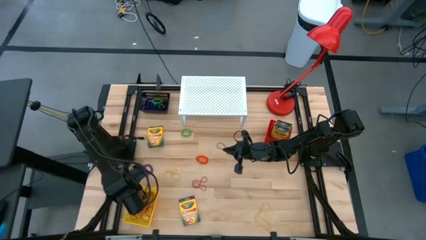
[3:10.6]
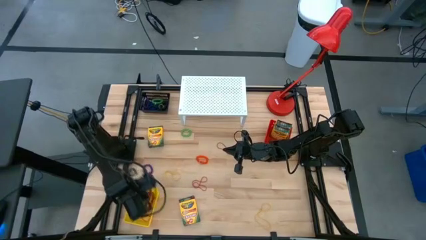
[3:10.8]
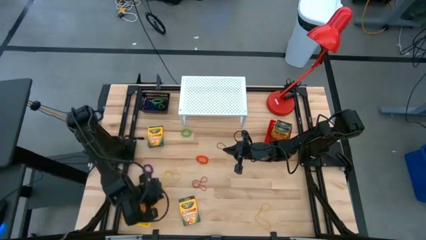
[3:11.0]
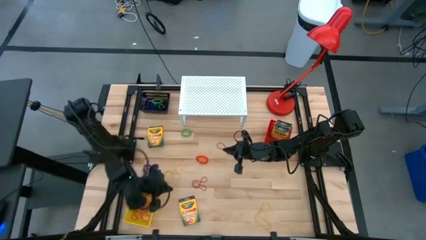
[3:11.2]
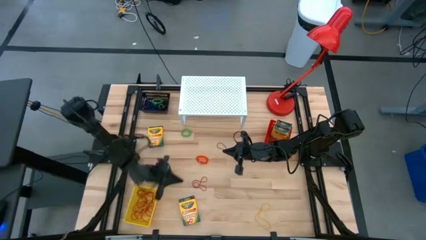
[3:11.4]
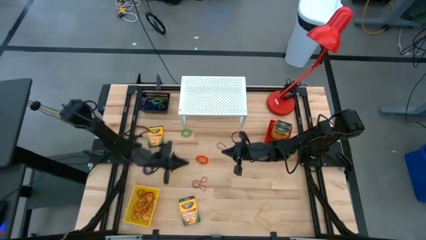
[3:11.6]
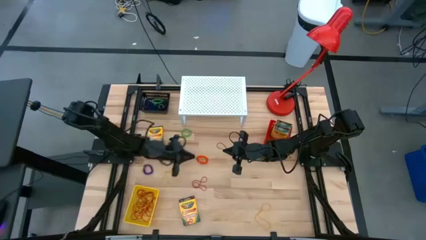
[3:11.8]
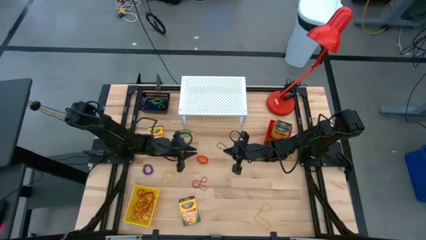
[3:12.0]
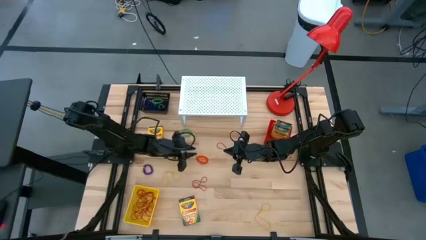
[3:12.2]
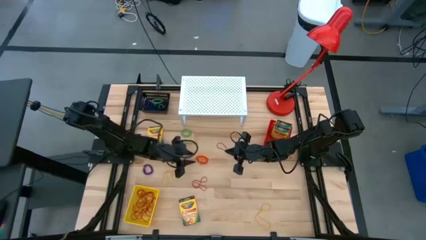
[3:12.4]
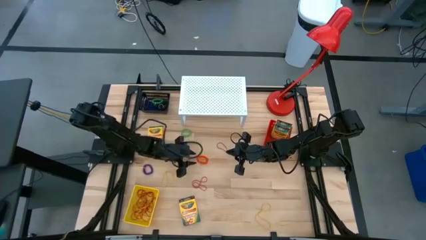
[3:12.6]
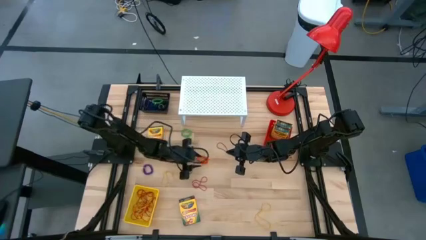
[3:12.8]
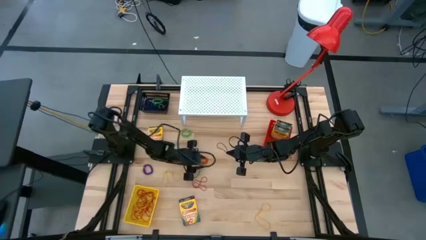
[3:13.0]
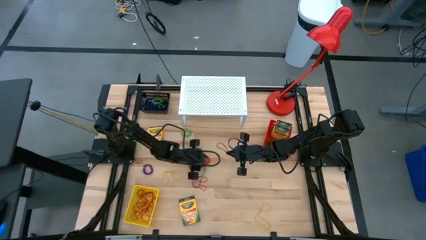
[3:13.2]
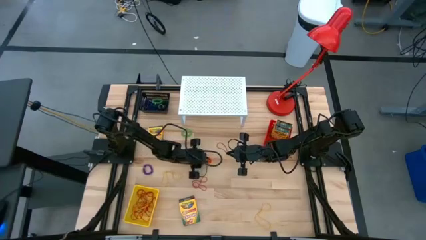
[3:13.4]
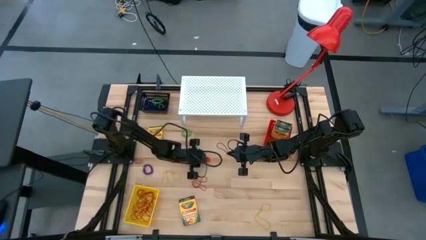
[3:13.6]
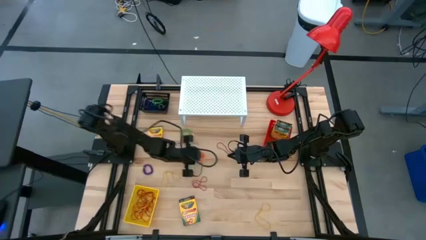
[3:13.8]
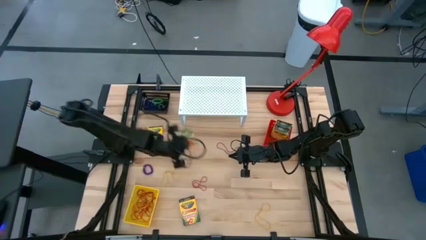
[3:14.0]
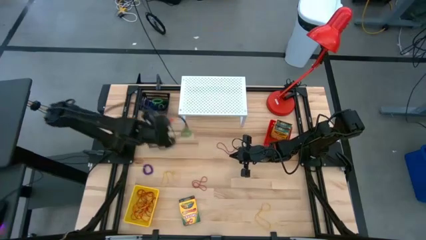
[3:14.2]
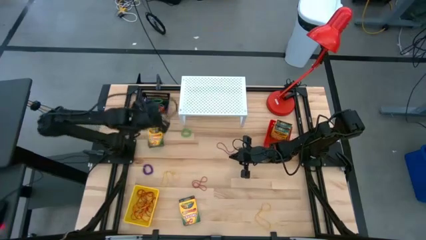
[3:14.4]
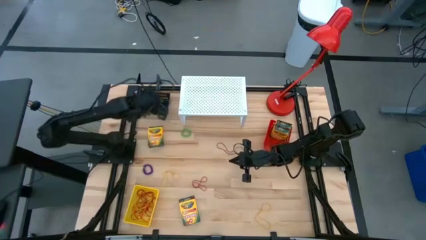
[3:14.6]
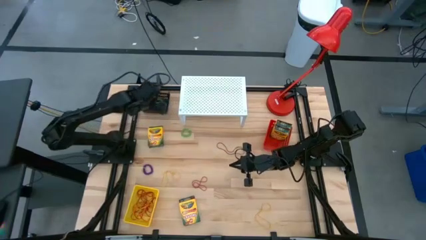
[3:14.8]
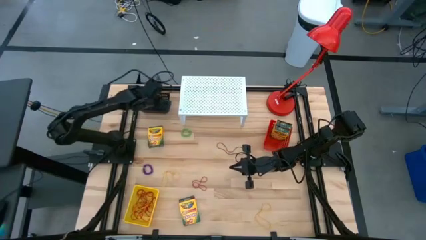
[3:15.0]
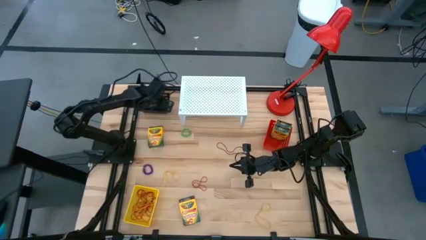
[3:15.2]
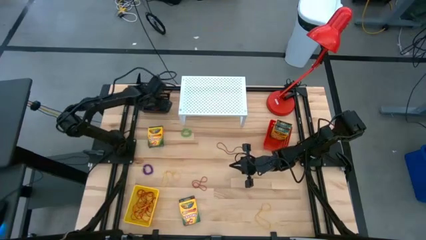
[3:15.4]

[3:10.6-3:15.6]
Task: Pick & Place Office Desk Supplies
Put the orange spring rubber band into the black bin

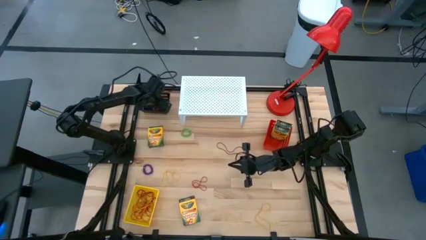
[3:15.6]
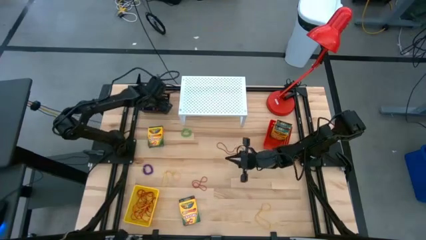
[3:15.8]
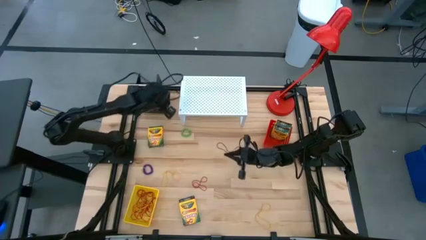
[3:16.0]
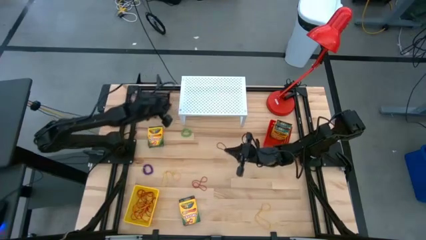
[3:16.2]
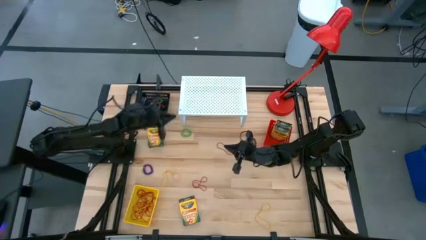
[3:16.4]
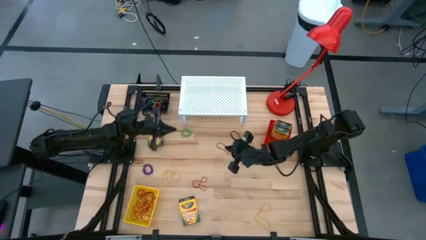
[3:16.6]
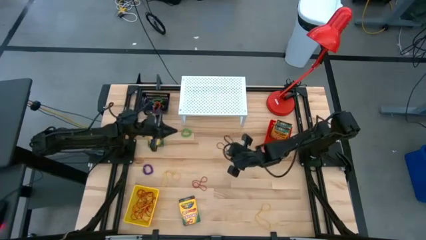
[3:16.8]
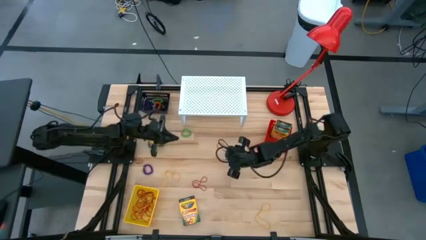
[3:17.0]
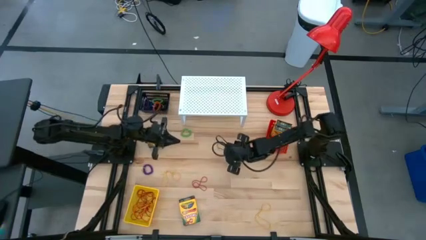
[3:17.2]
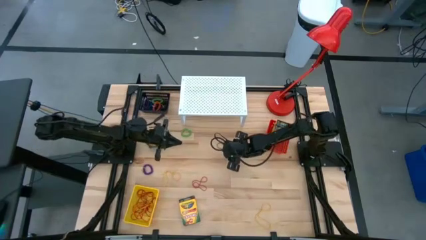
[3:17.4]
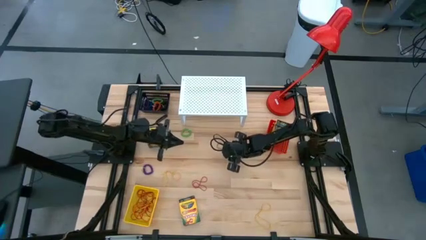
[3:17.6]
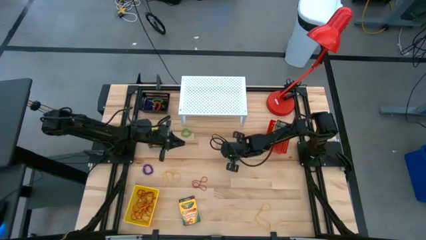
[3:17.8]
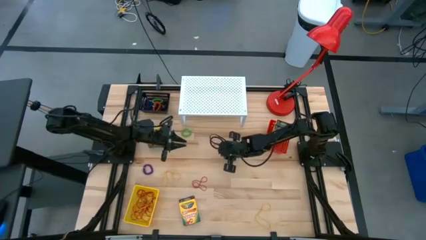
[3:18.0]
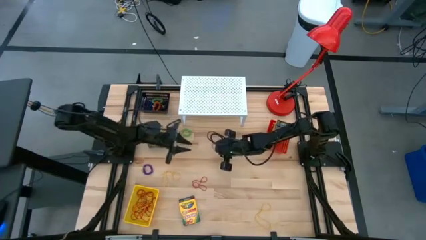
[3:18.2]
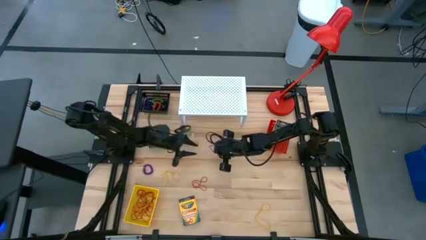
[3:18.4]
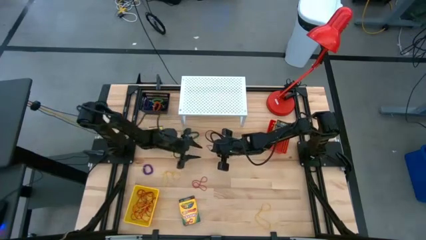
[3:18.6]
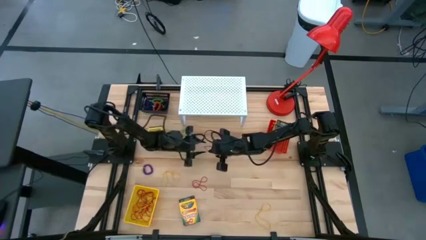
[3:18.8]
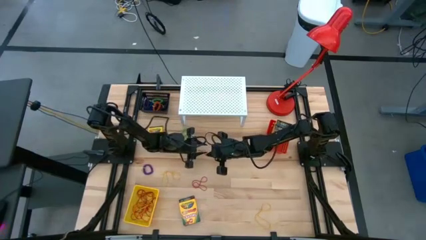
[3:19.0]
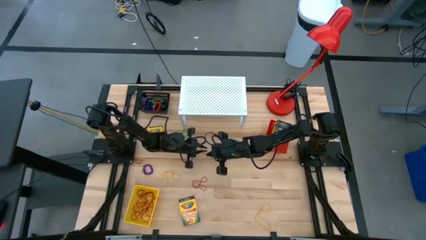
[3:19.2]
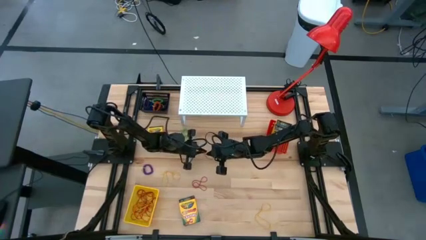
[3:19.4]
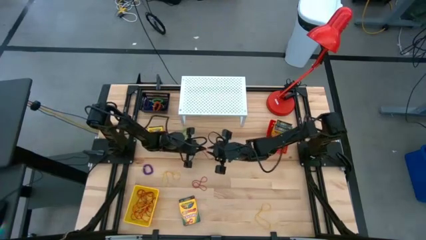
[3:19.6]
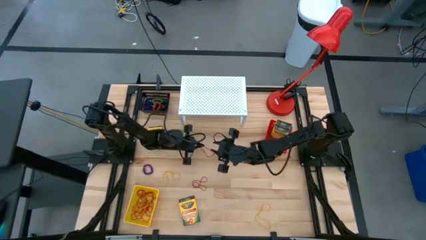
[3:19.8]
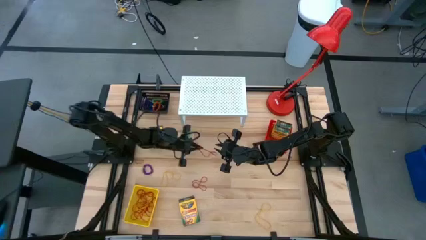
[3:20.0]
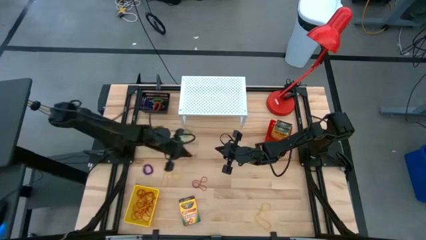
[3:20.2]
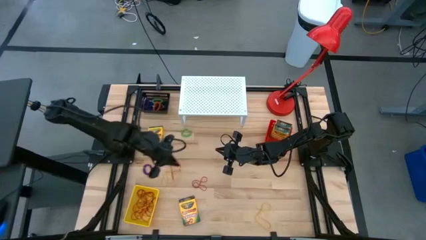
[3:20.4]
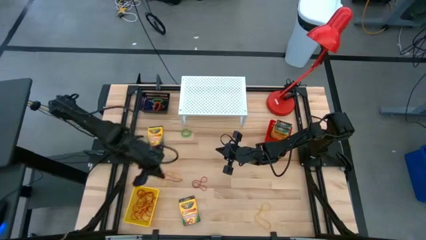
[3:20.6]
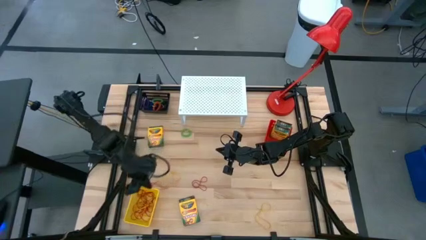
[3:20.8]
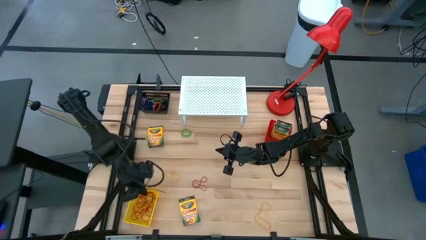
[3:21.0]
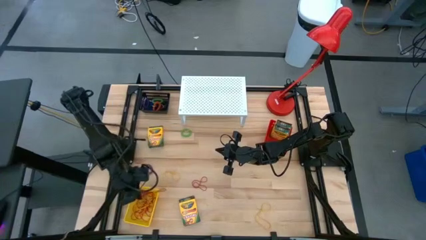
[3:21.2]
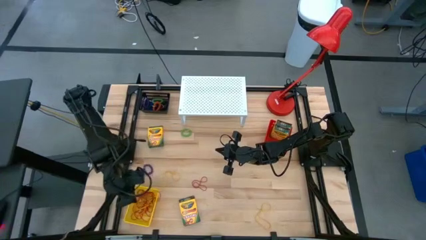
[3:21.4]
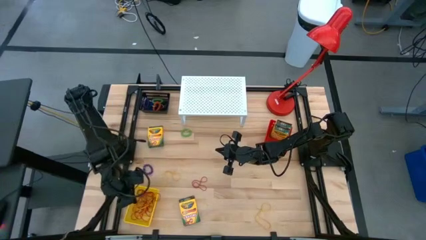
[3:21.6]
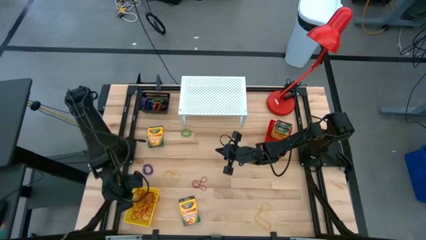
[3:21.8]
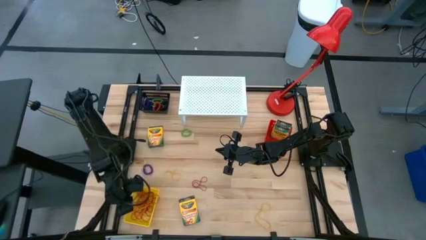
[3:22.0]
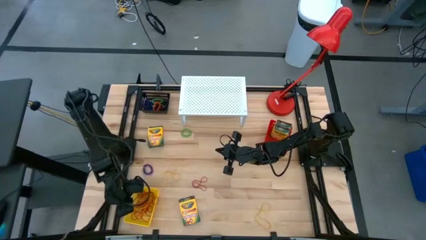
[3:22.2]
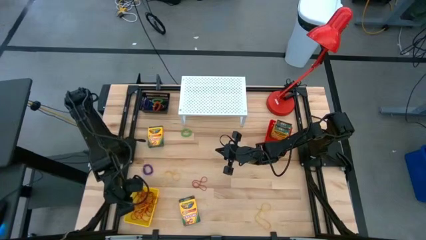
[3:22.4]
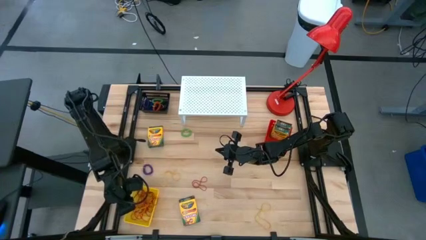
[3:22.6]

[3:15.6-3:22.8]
Put the red rubber band into the yellow bin

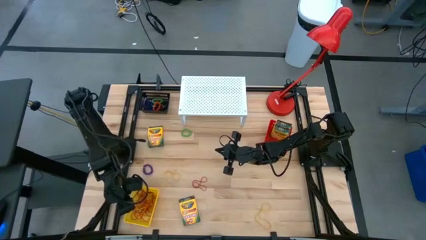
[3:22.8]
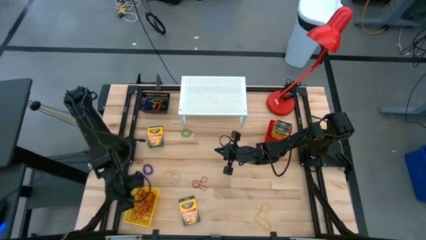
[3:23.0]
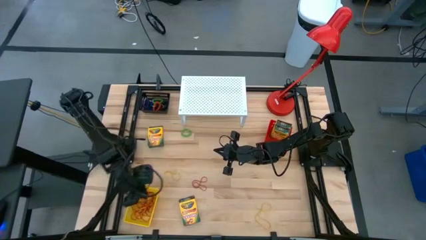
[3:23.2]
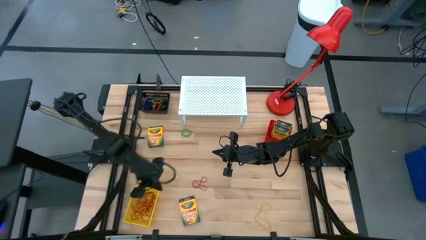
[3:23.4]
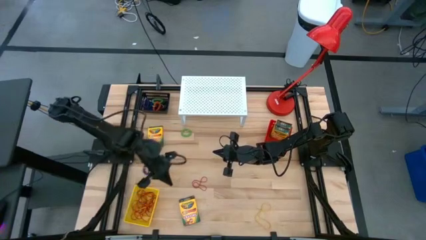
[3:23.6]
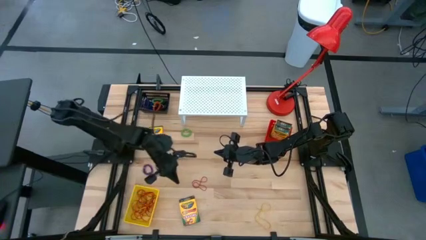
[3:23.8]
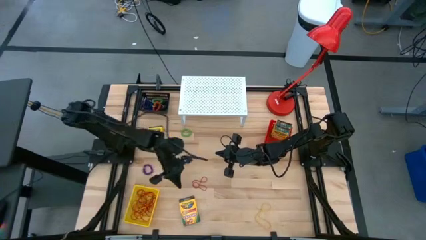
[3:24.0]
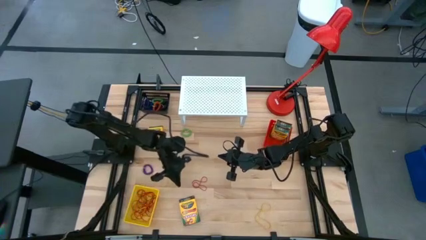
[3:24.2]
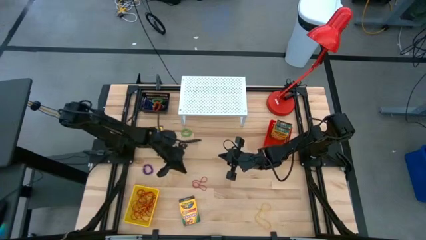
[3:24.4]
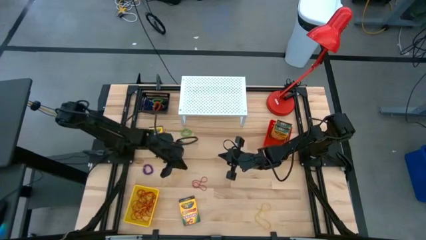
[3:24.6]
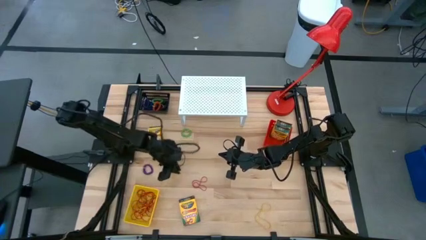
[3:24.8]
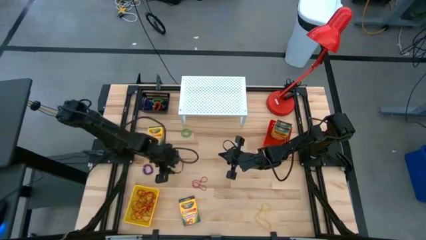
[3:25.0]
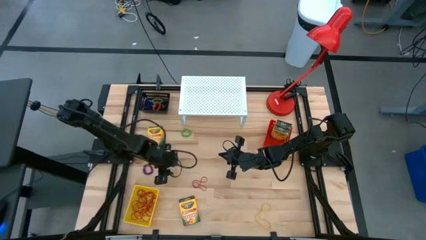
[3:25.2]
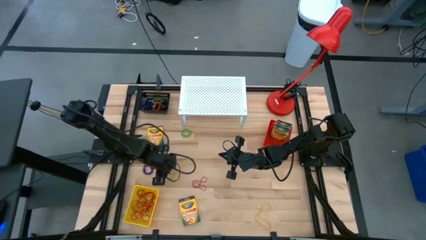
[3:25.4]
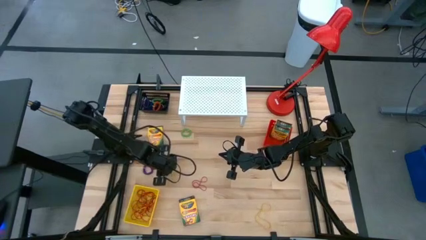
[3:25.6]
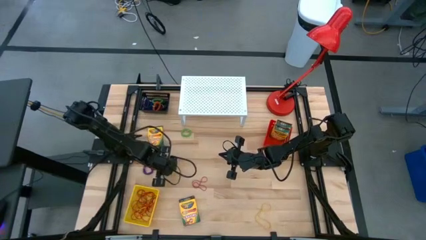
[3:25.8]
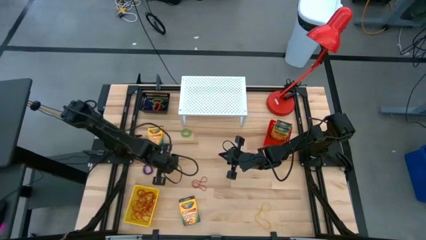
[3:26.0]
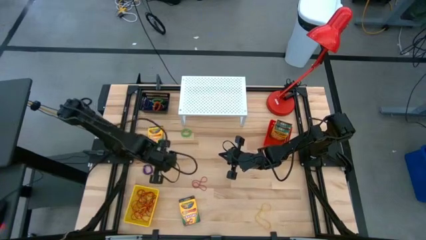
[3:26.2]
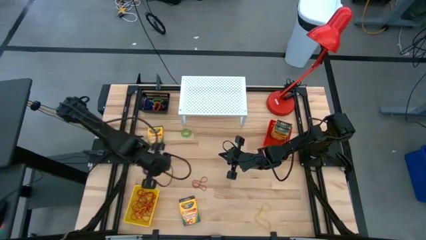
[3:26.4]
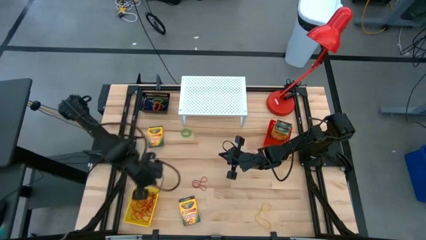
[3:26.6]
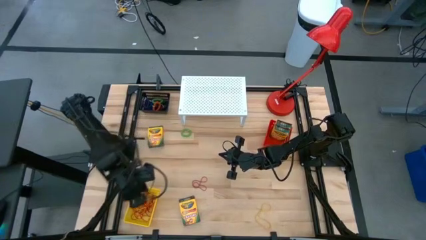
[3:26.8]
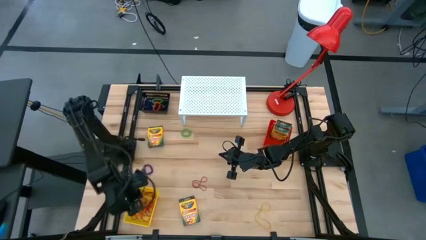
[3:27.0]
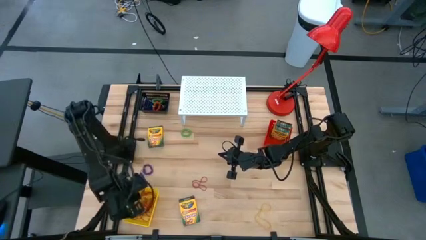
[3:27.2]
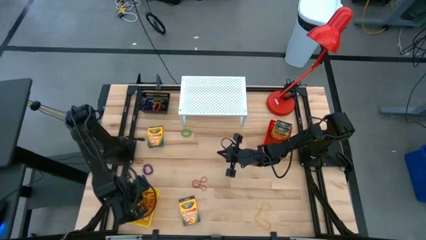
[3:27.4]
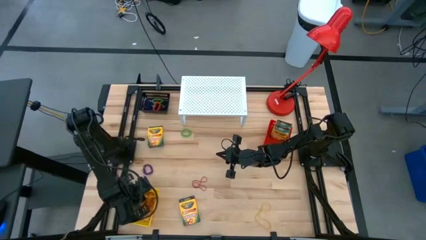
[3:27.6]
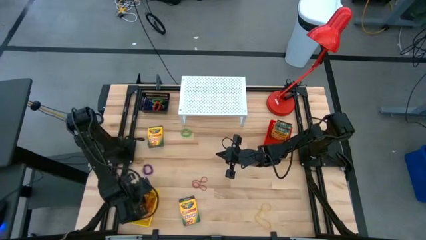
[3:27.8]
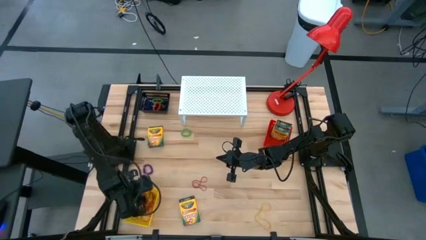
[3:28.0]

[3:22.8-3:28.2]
Put the left yellow rubber band into the yellow bin
